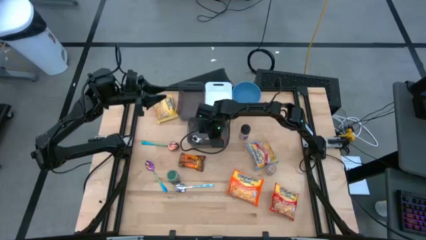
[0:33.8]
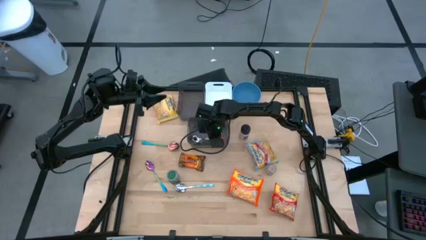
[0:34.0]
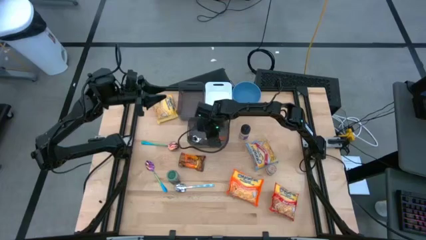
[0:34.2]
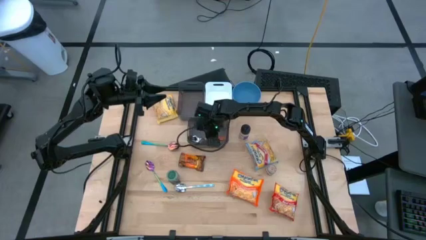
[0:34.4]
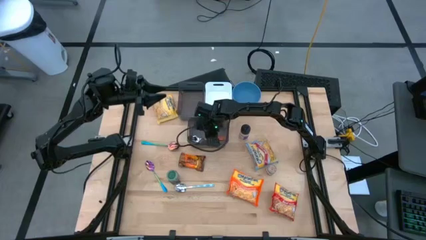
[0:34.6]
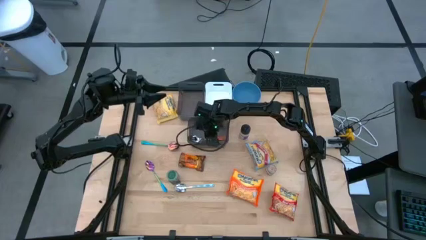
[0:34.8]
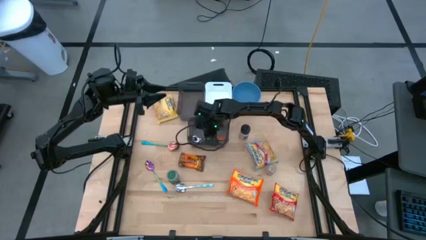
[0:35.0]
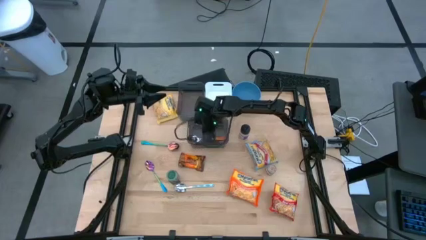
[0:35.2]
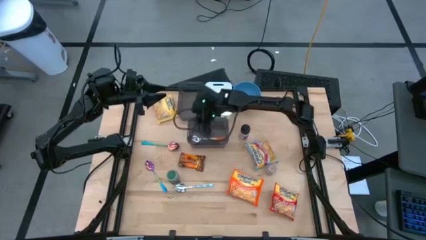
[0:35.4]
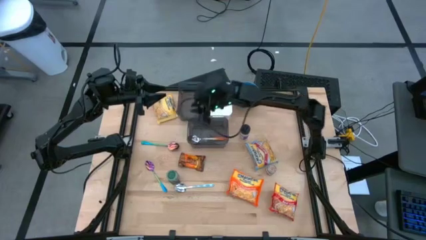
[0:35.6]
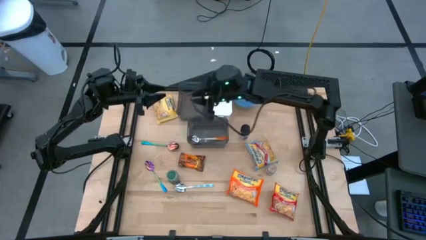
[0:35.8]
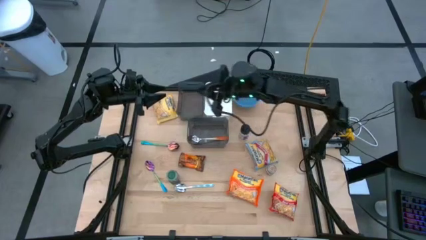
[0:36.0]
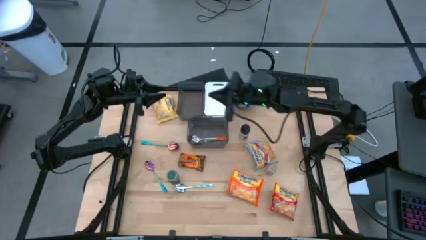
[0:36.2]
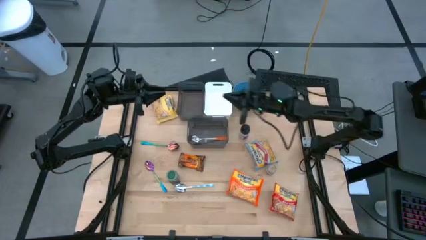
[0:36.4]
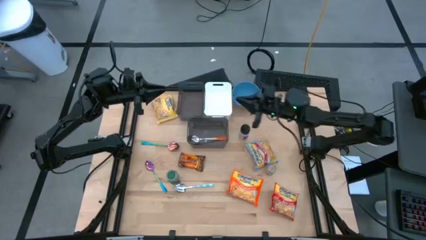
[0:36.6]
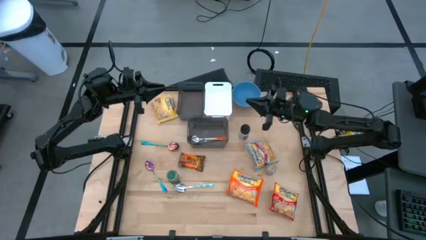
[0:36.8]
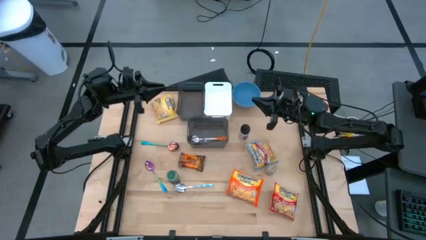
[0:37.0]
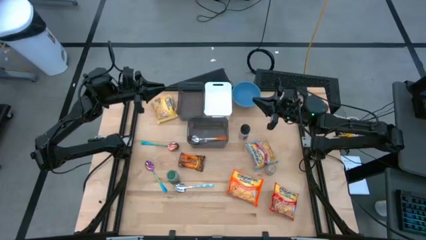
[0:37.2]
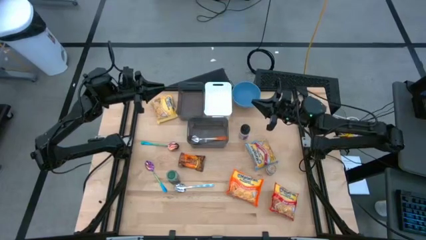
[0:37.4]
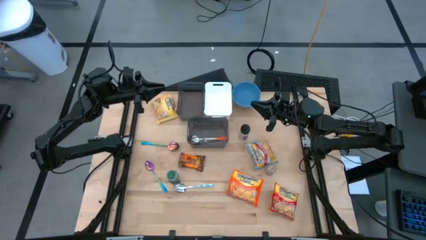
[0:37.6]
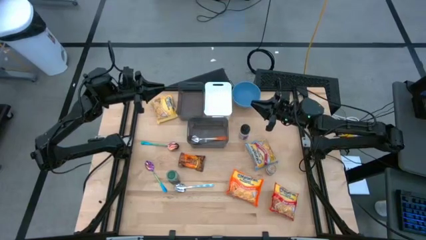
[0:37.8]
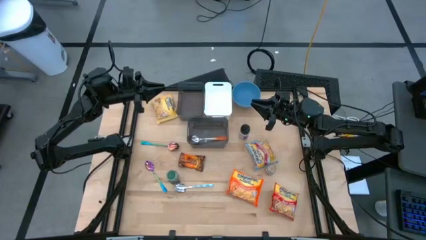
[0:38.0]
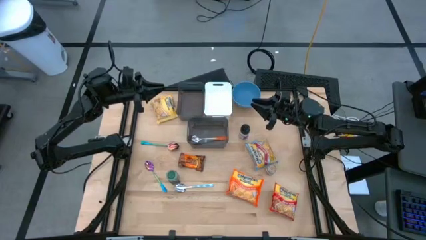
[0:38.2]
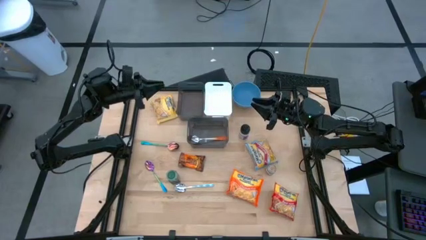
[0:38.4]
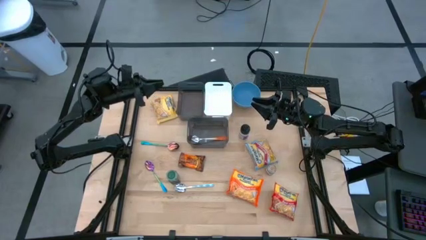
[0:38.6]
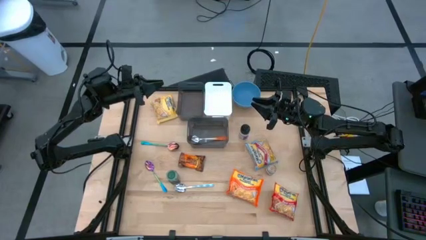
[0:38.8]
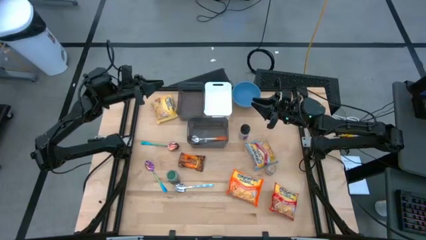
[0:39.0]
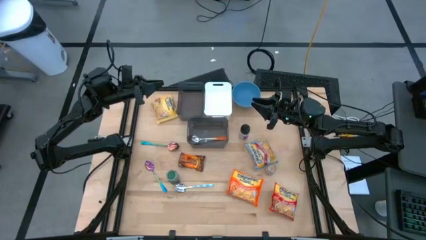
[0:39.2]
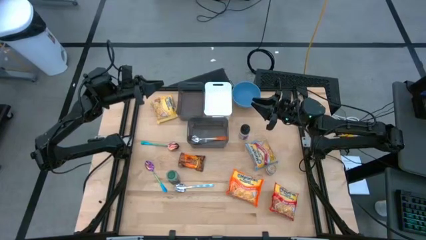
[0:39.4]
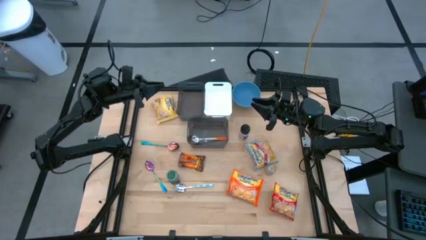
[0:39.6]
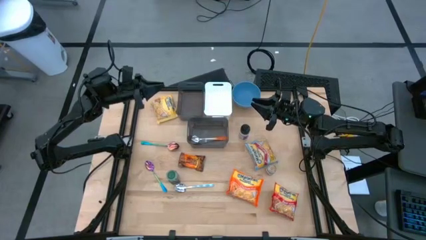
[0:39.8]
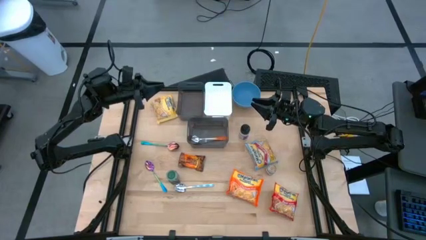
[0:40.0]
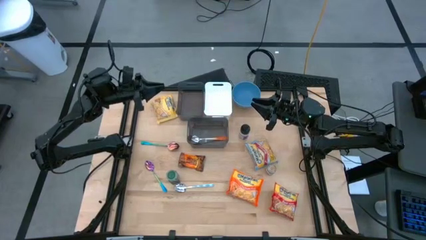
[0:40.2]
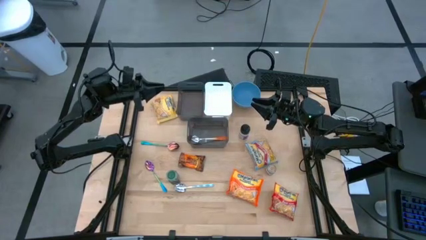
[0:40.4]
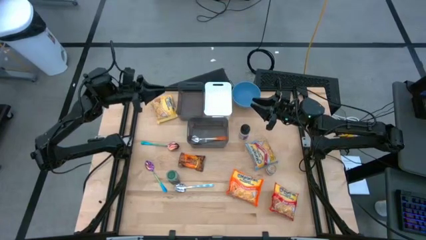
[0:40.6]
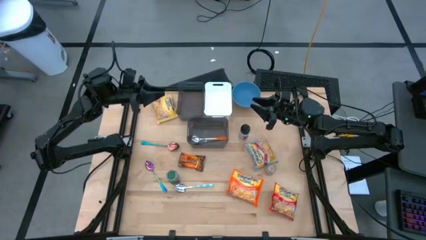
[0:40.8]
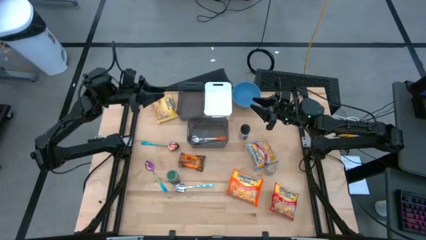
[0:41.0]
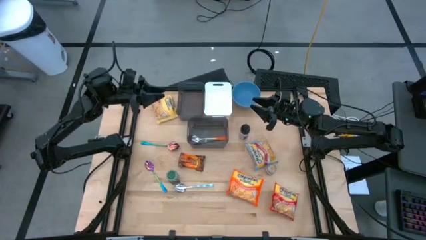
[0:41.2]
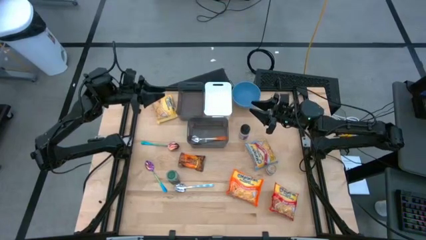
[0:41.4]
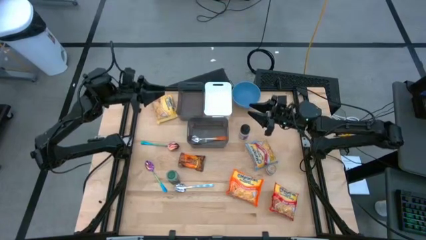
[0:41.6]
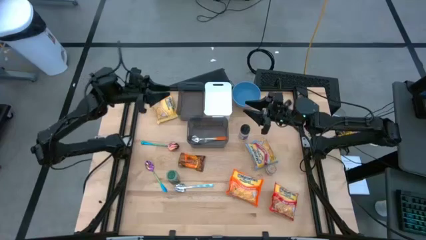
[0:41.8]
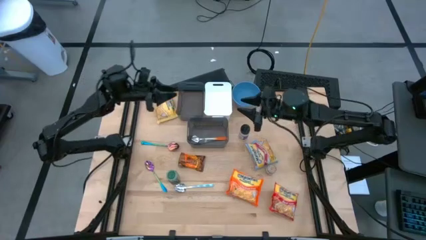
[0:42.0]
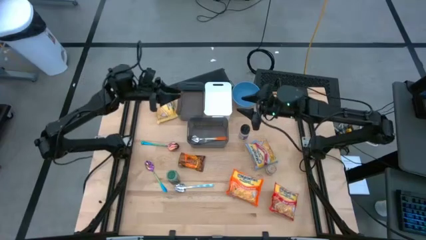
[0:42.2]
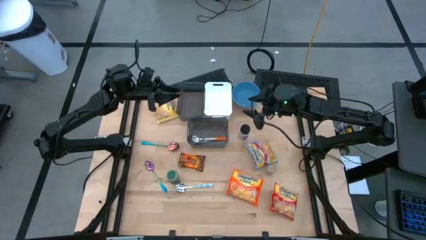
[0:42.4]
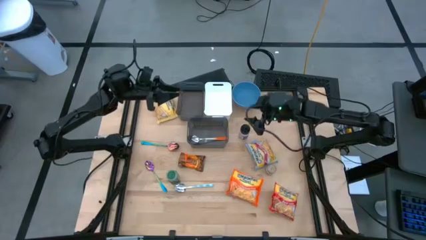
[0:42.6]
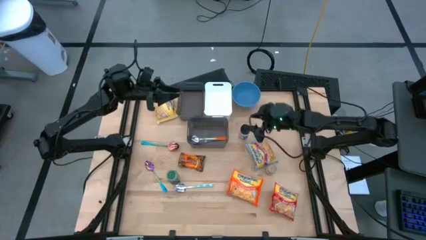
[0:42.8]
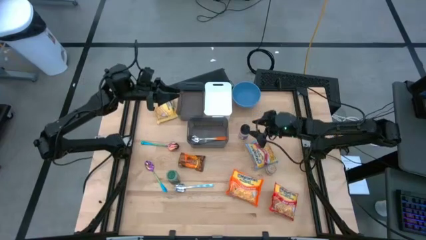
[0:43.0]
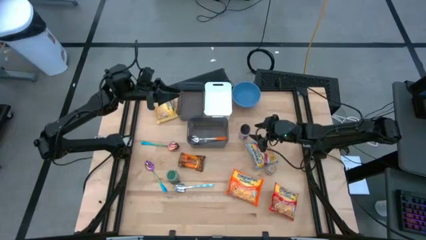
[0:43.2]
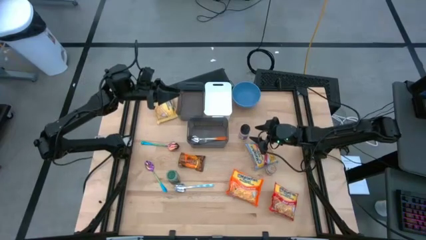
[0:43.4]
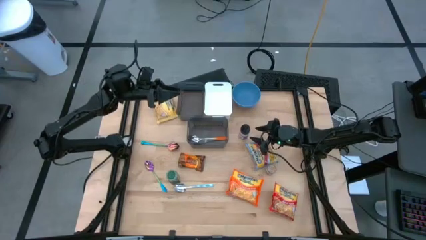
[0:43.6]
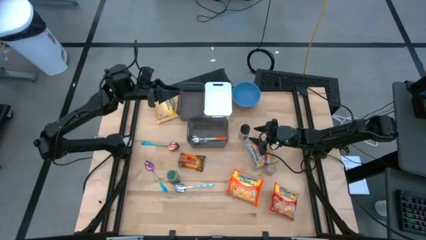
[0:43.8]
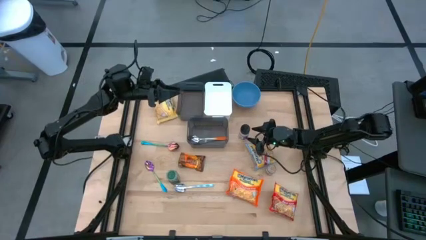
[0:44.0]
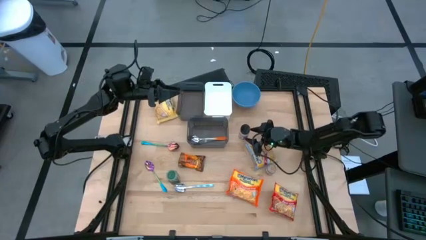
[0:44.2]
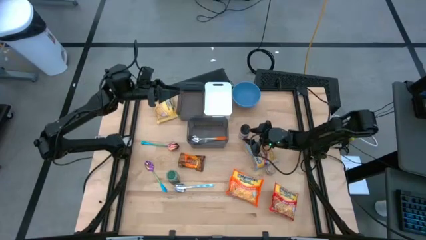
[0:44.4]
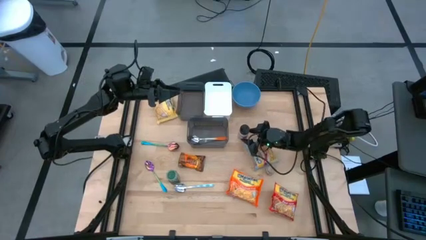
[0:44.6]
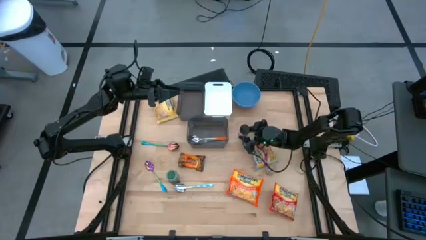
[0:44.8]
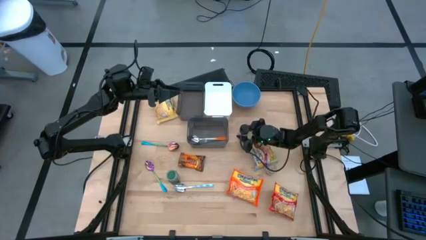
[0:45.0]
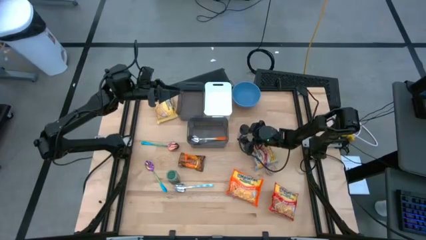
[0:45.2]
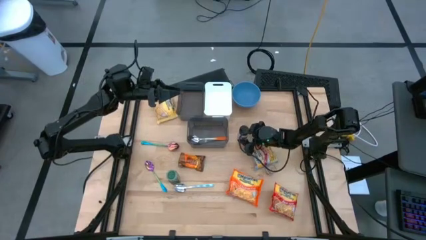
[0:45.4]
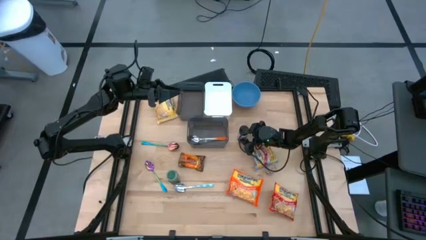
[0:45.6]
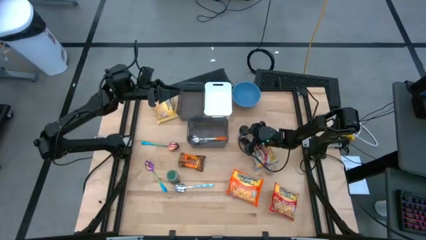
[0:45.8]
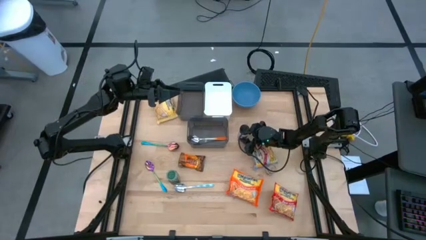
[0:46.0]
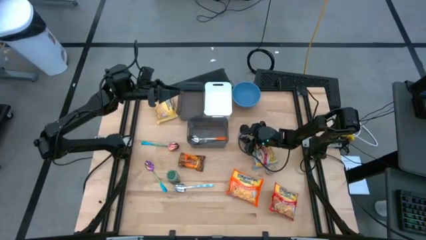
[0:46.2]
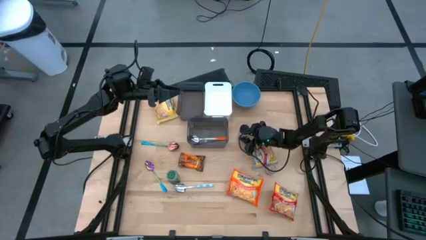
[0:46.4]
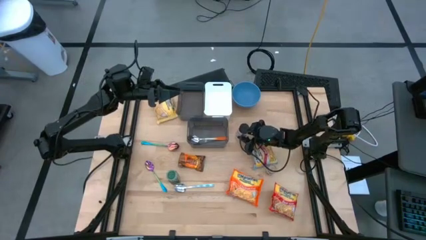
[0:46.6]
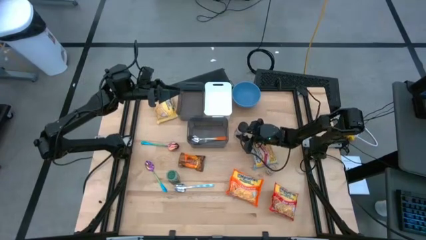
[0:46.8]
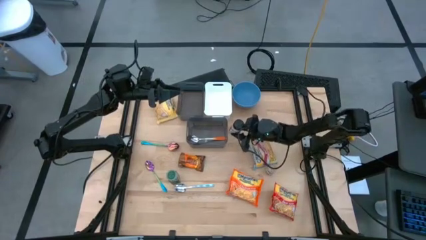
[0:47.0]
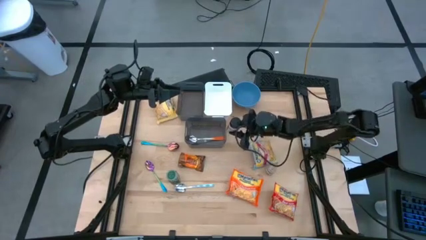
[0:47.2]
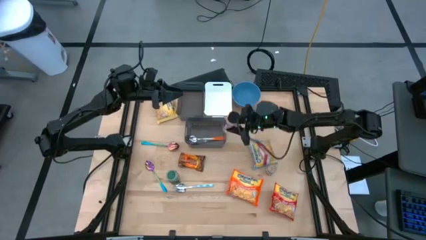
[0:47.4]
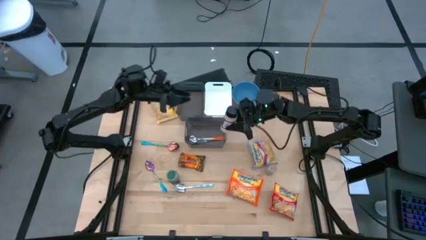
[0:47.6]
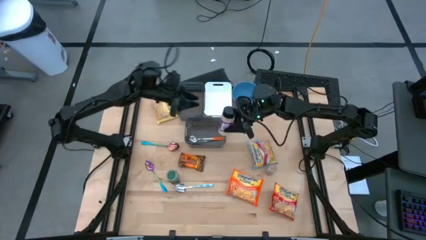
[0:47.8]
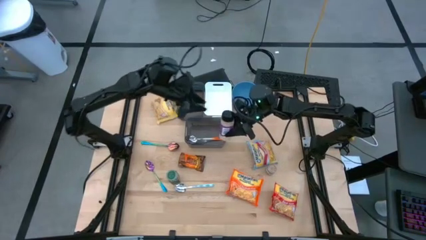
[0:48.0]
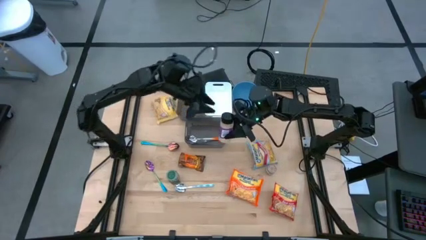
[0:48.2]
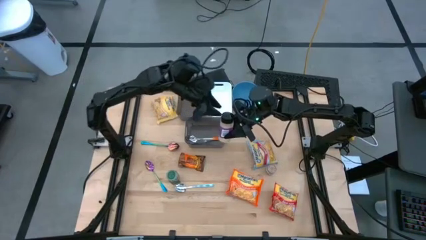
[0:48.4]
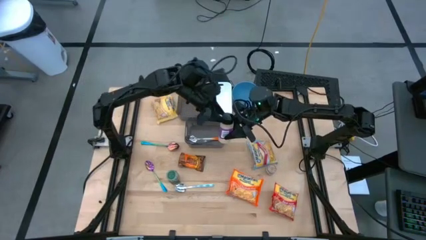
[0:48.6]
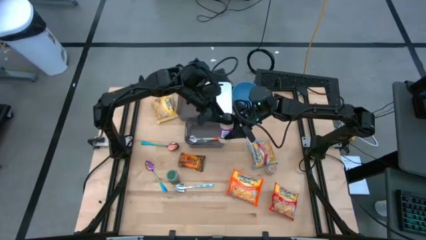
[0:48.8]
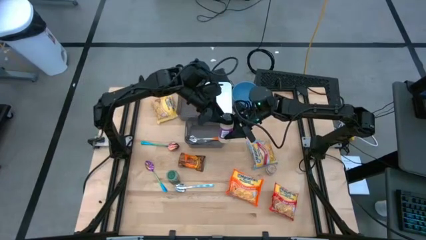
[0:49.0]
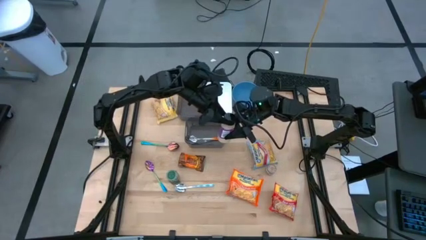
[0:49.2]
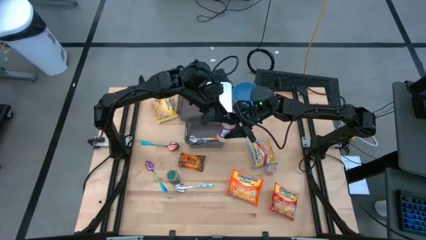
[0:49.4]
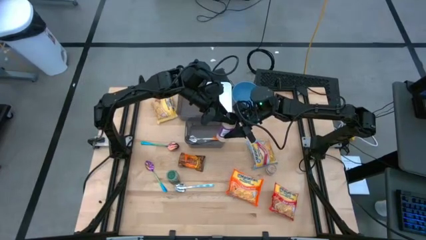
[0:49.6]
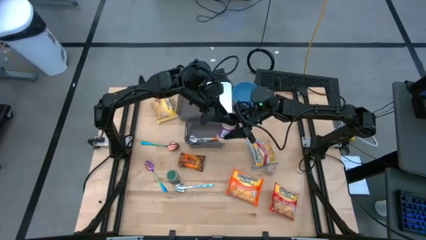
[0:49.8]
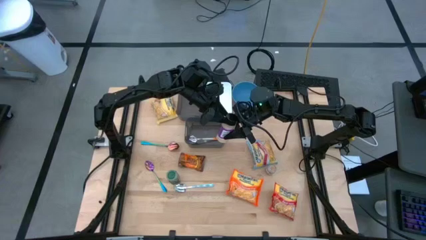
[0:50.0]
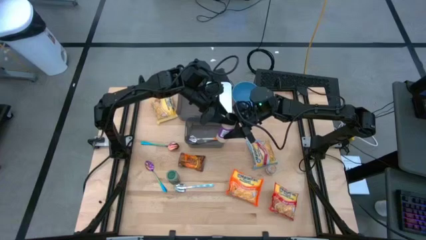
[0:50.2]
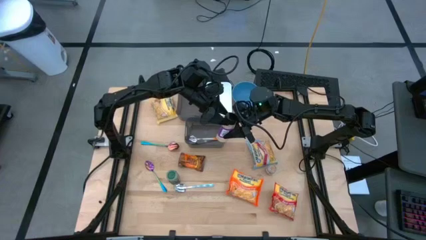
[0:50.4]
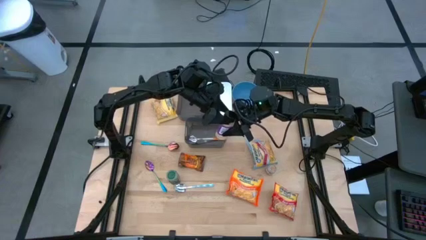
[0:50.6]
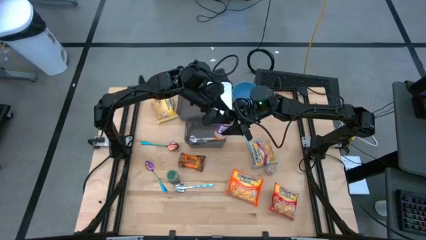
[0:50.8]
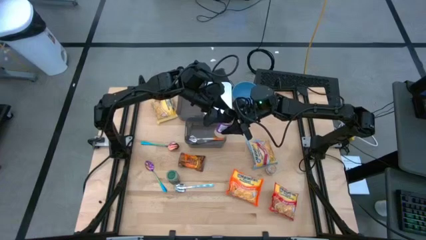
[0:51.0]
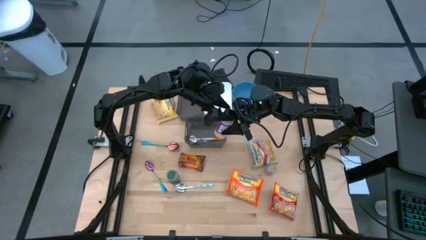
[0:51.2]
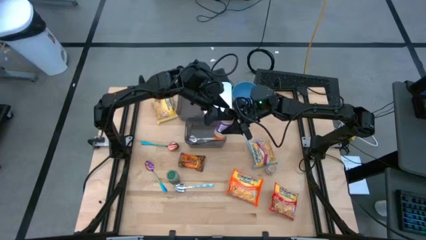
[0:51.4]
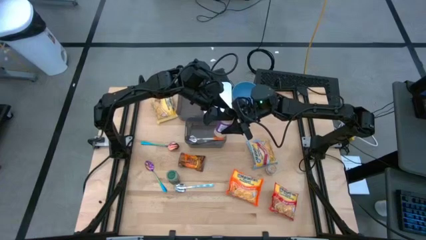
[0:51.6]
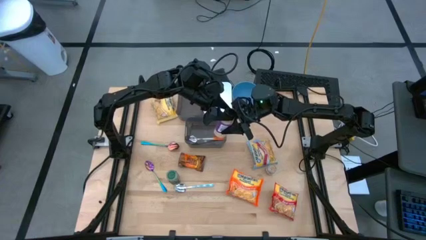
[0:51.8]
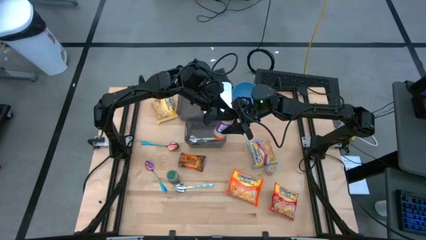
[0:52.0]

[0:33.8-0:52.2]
Task: Pick & Place Food Item
Put the violet seasoning bottle into the top black bin
